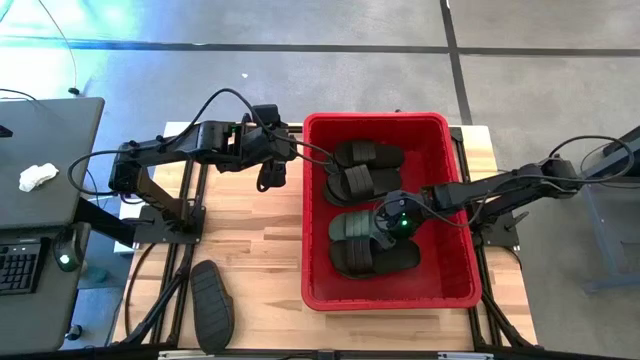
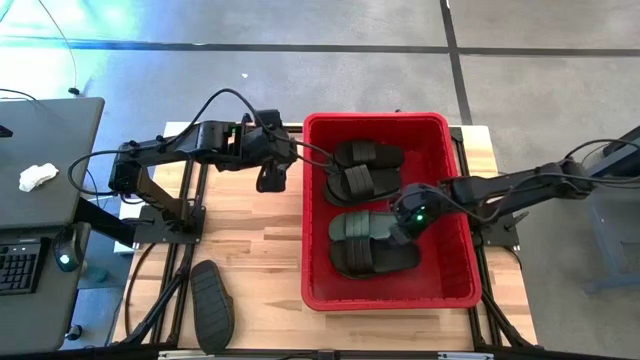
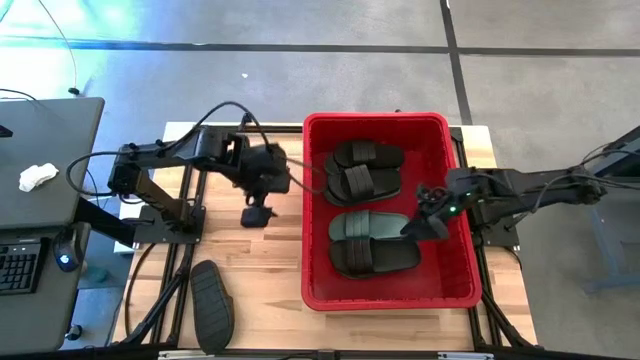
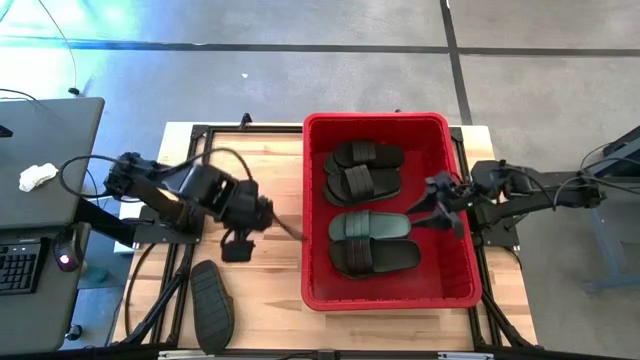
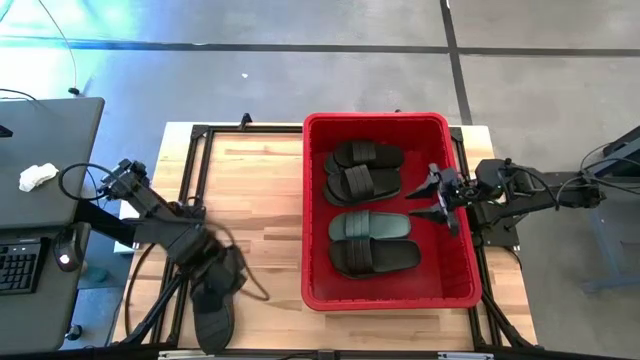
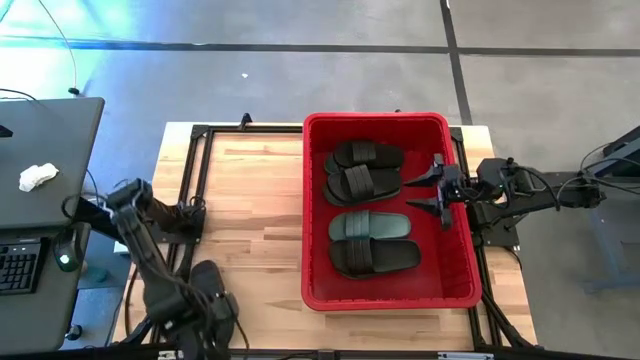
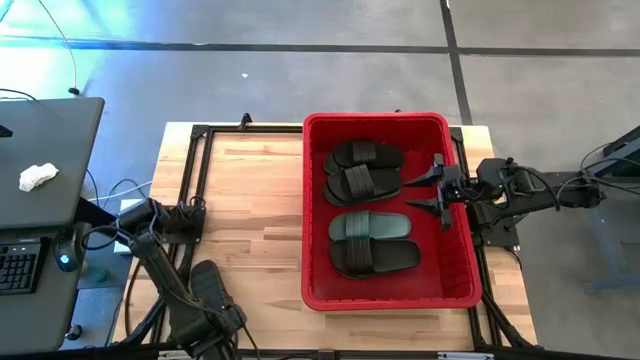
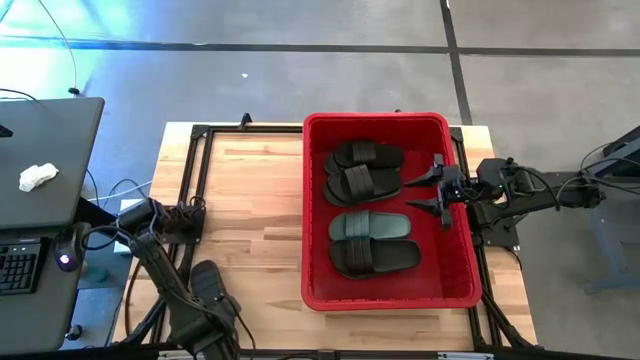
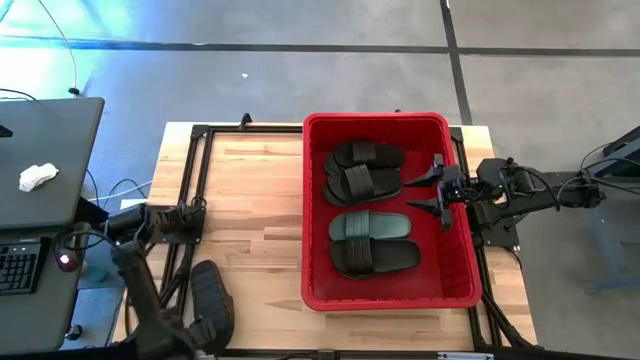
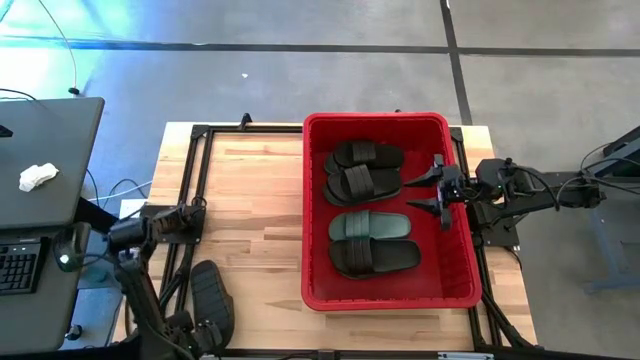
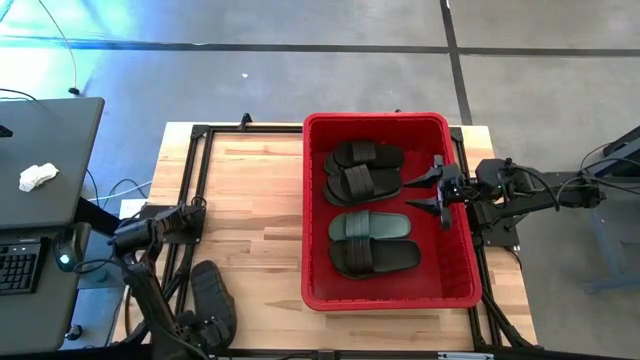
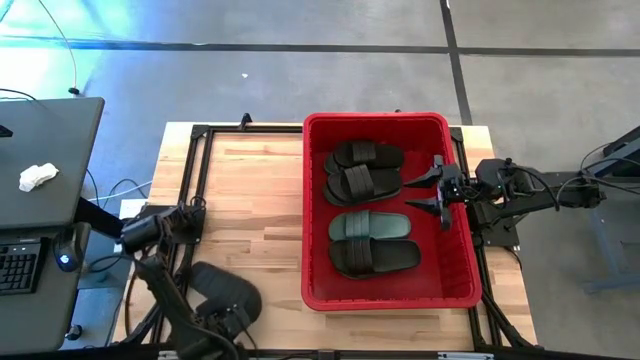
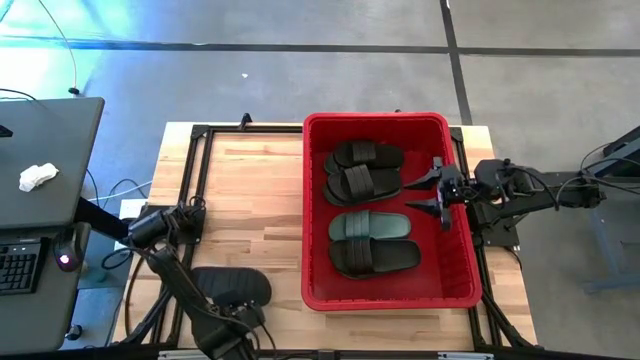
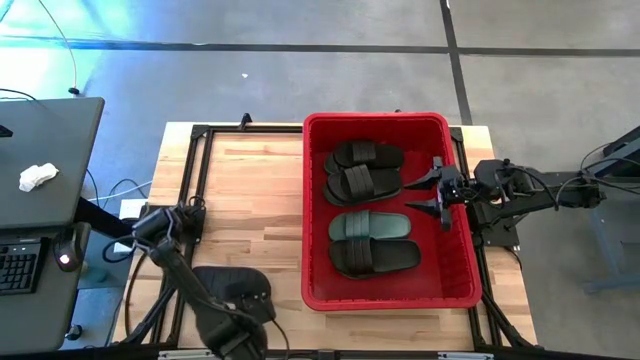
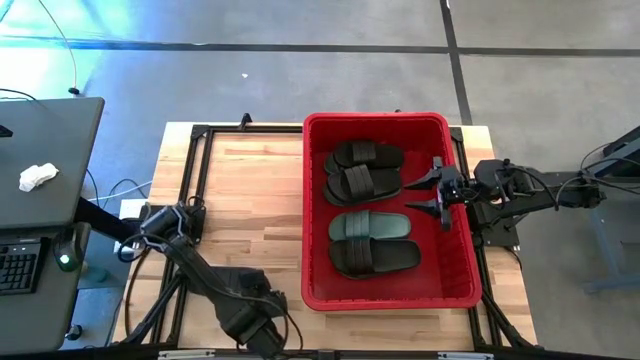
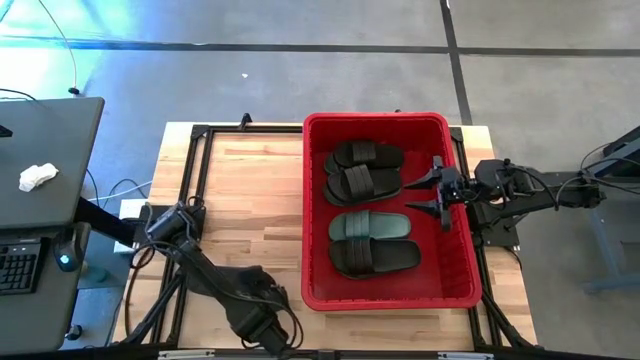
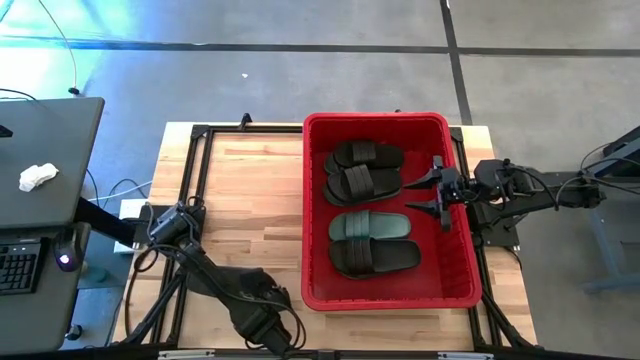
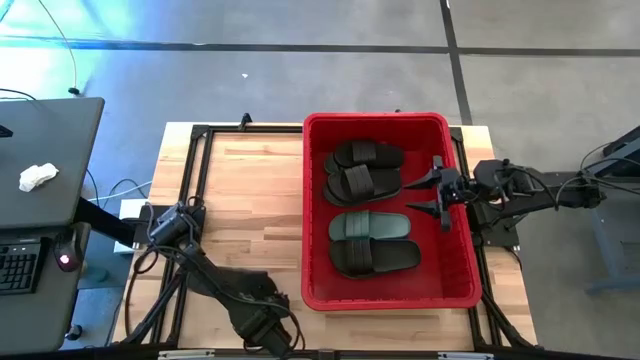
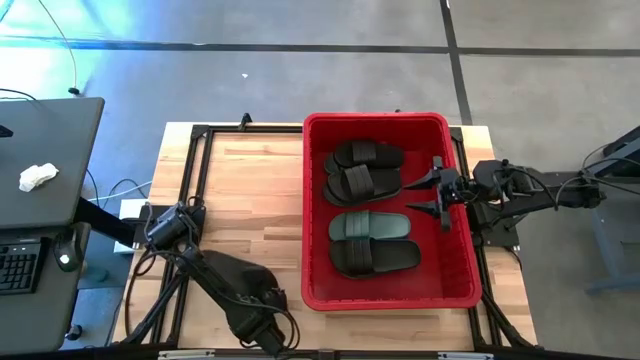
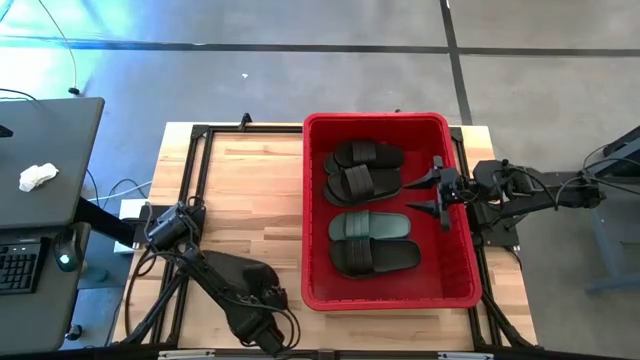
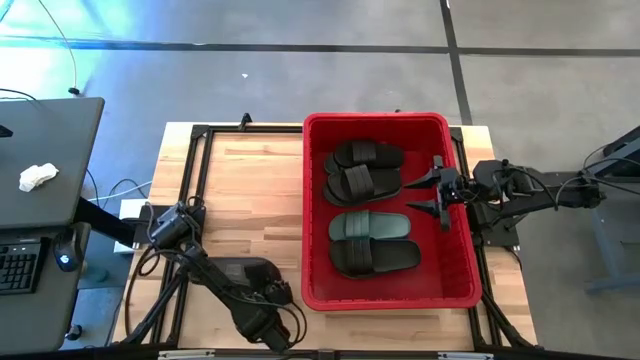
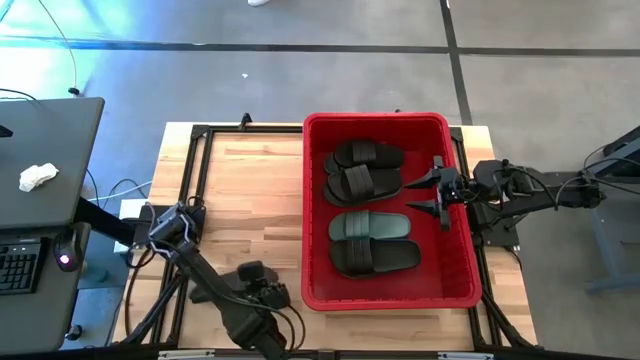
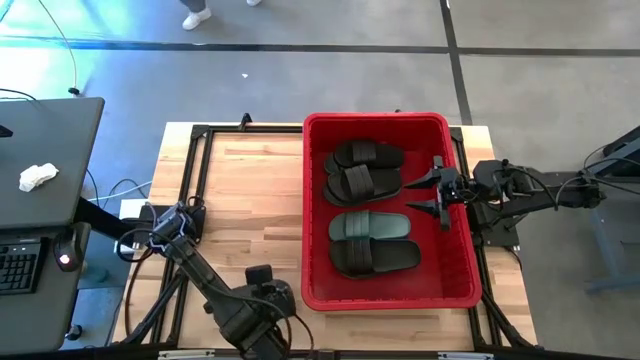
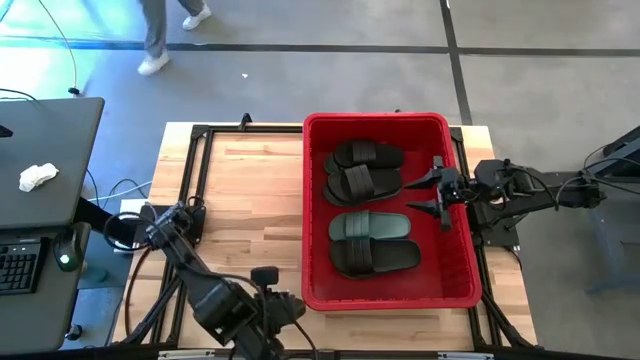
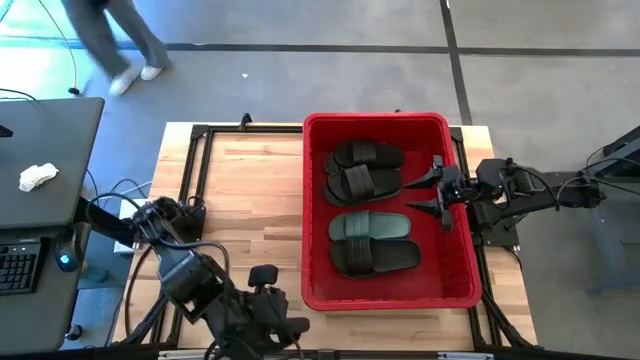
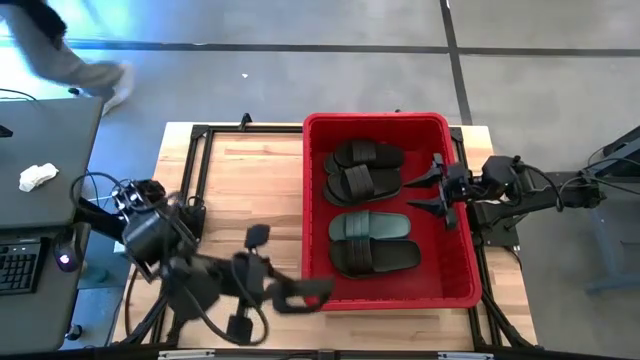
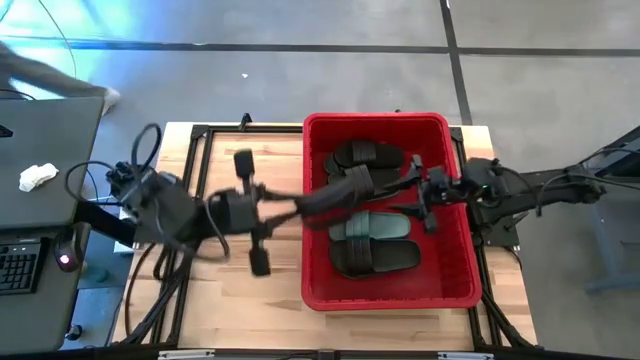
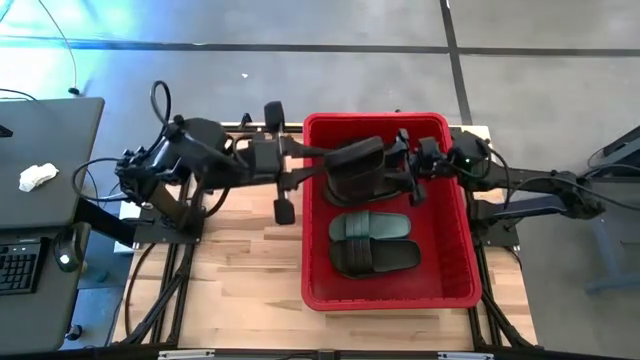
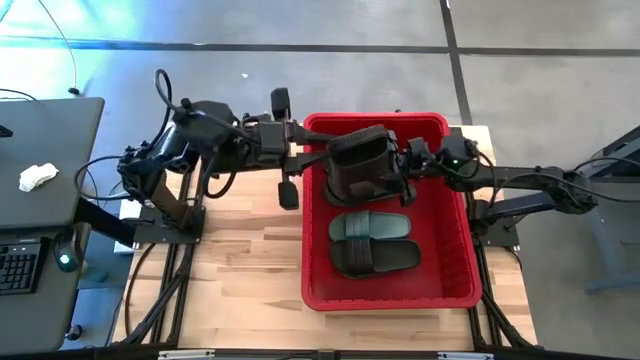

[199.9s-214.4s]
Task: Pick and place slides into bin
Put the black slide into the red container

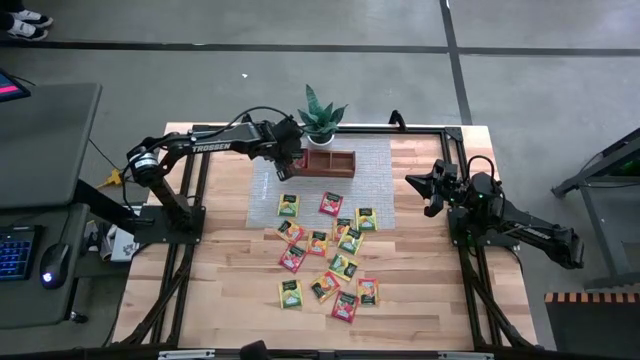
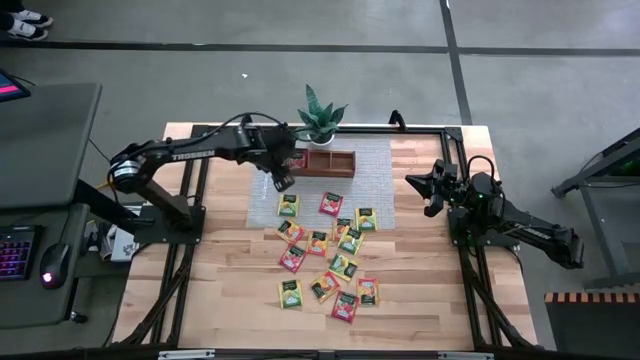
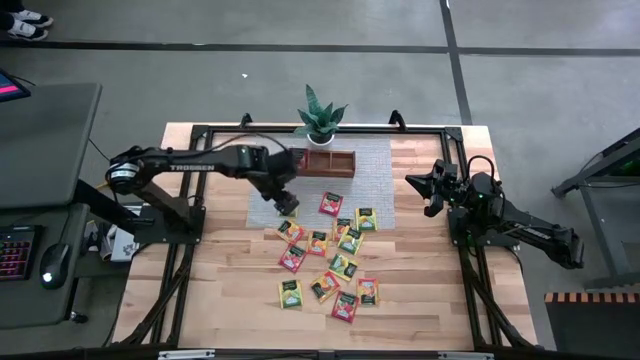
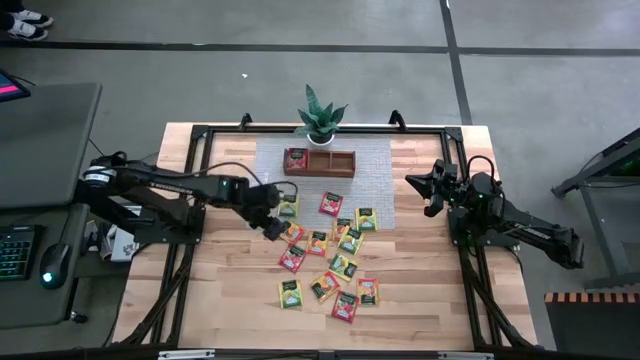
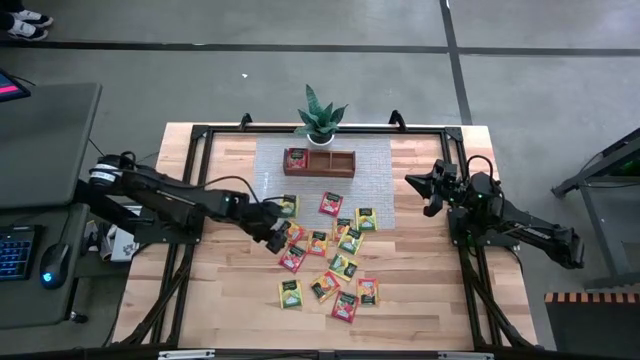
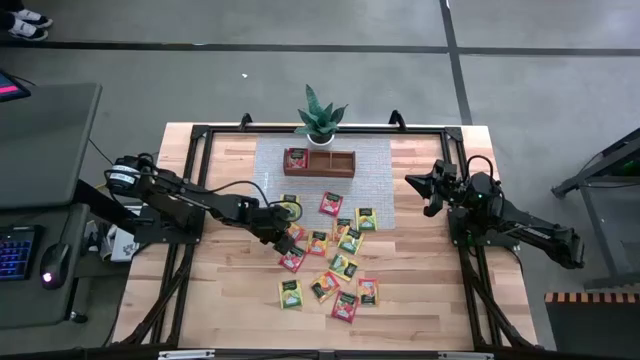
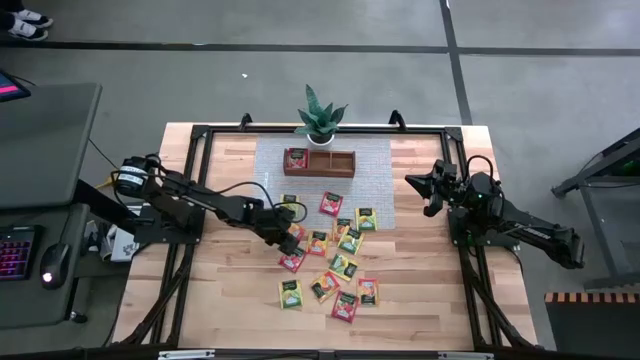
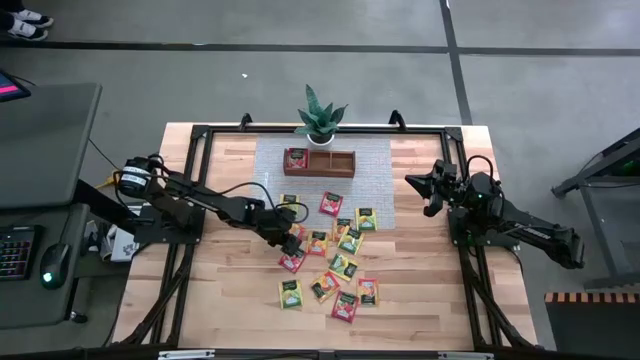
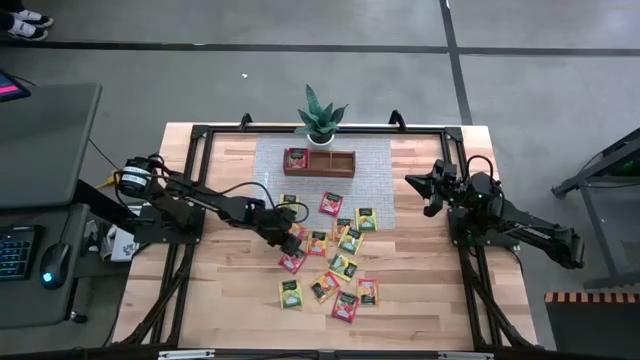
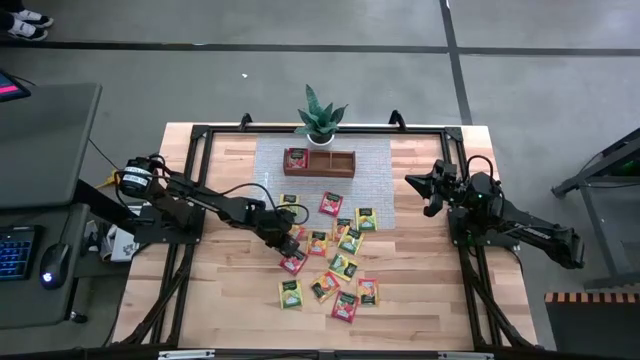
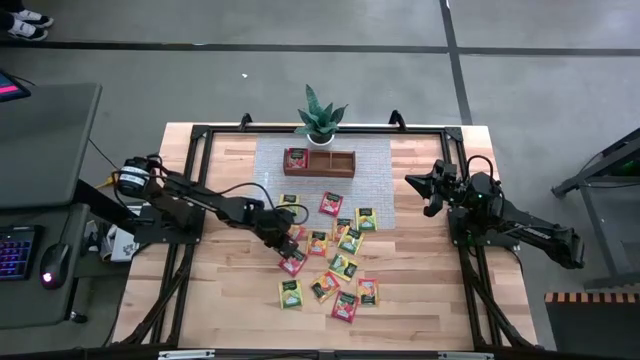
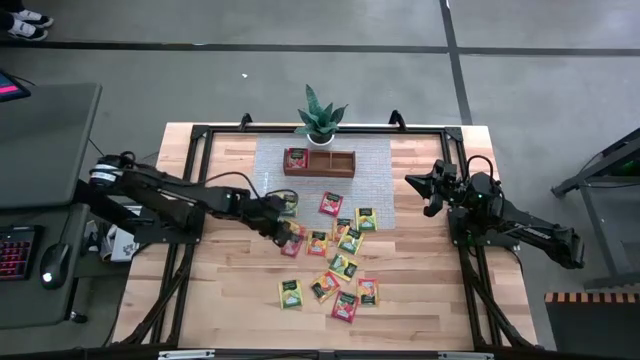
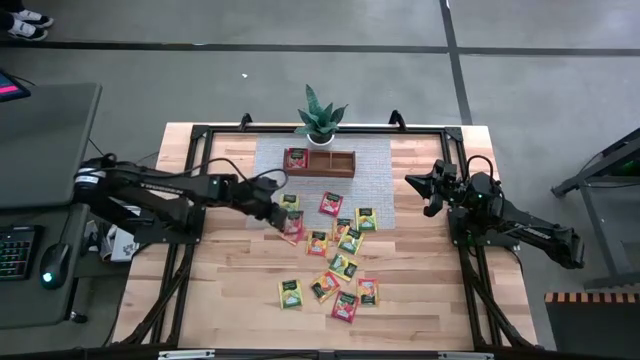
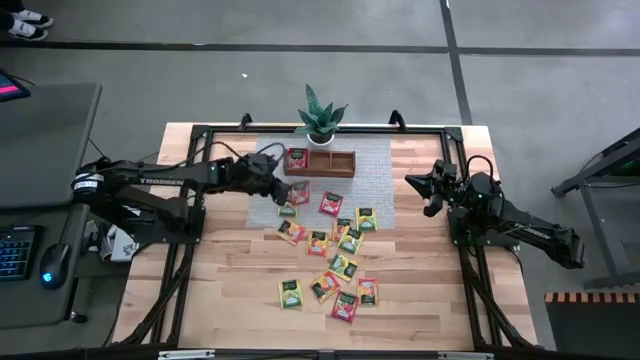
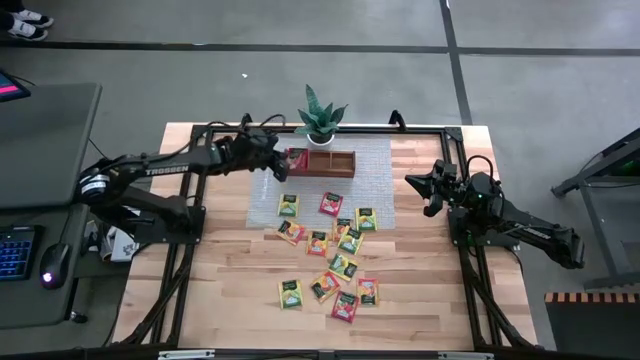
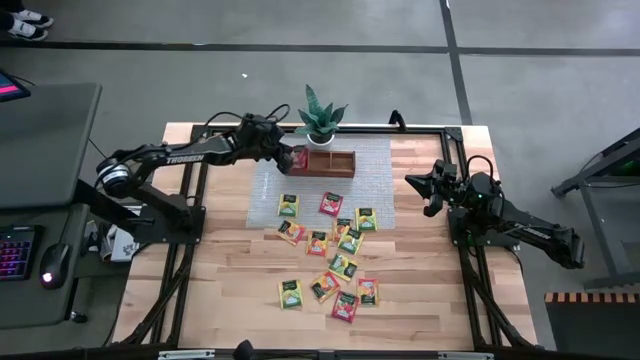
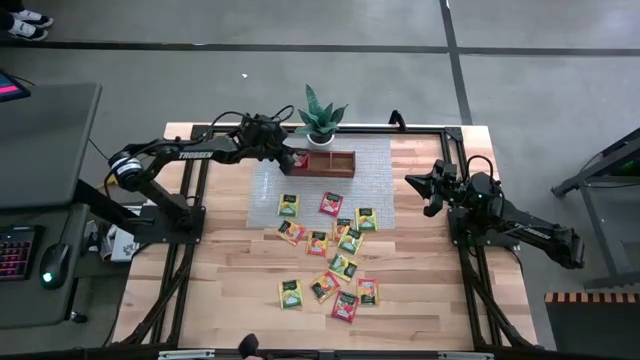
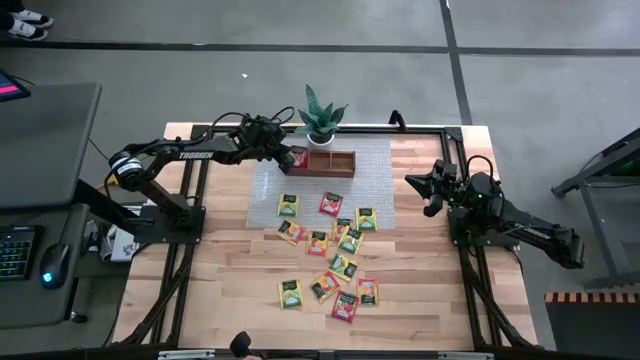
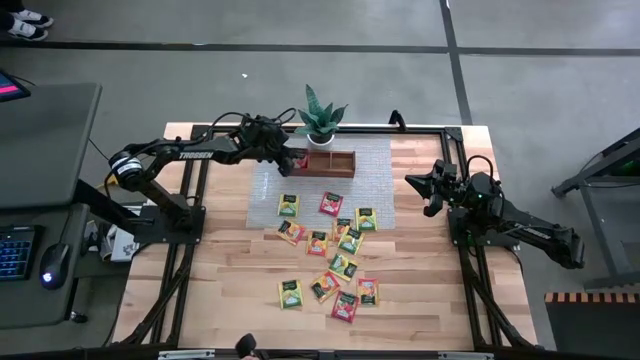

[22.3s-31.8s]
Task: Pick & Place Tea
Put the red tea bag into the left section of the wooden organizer
